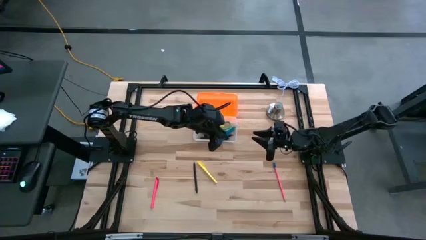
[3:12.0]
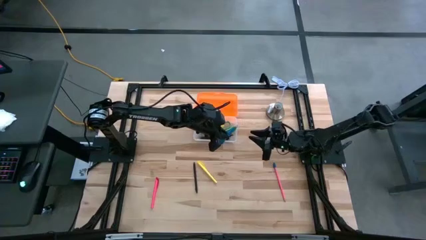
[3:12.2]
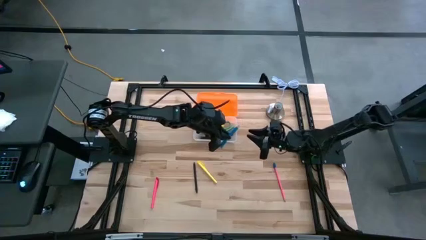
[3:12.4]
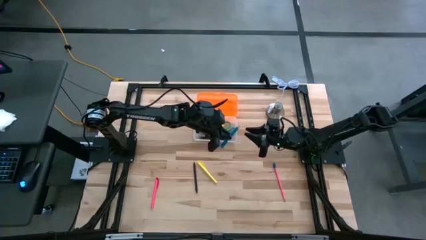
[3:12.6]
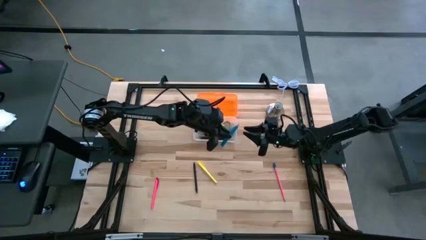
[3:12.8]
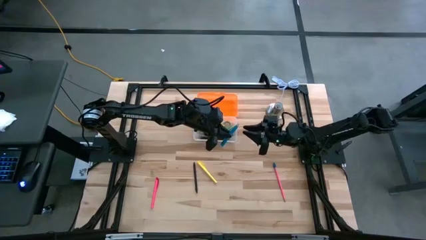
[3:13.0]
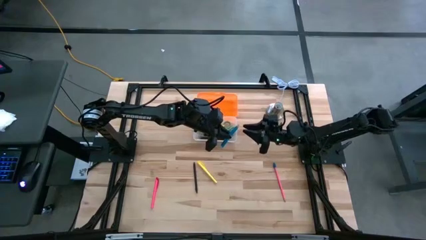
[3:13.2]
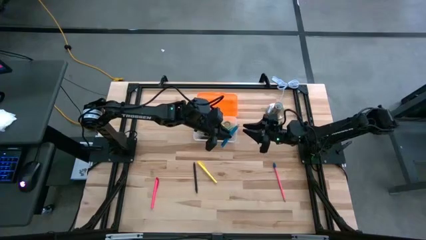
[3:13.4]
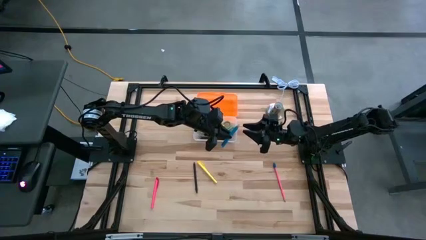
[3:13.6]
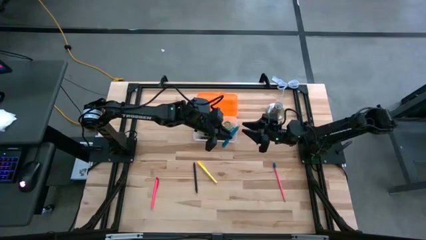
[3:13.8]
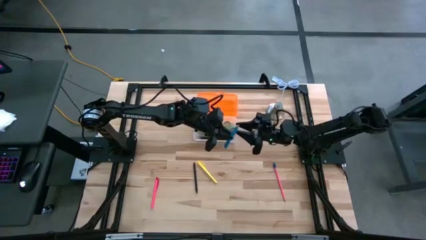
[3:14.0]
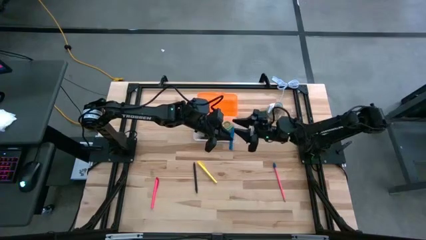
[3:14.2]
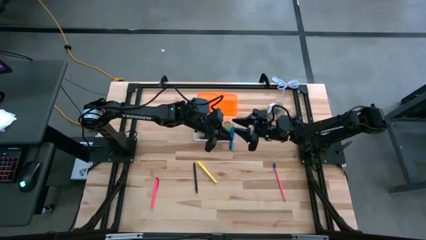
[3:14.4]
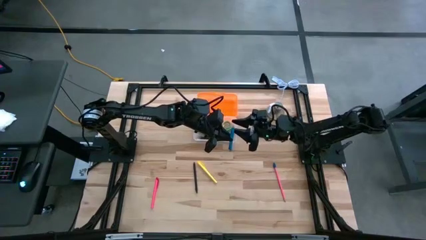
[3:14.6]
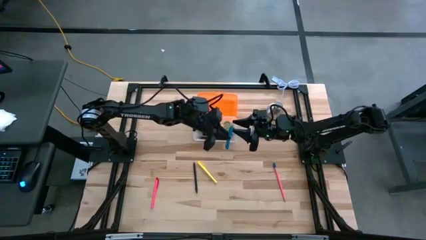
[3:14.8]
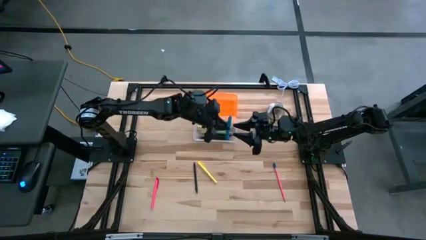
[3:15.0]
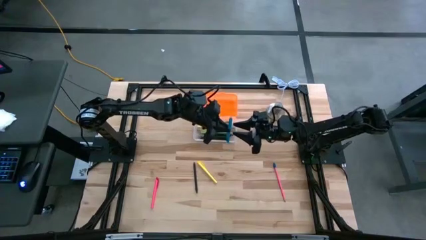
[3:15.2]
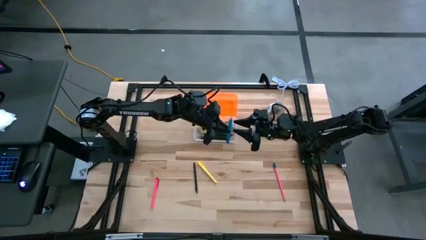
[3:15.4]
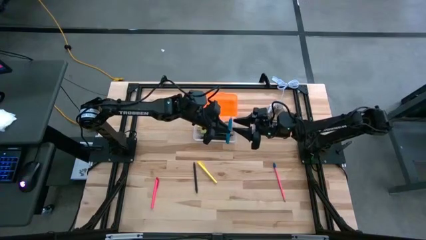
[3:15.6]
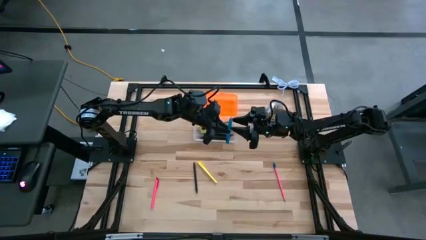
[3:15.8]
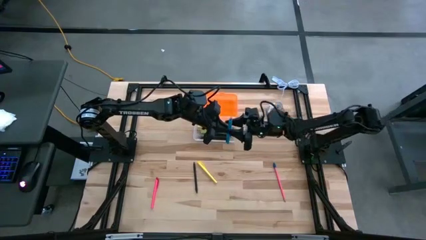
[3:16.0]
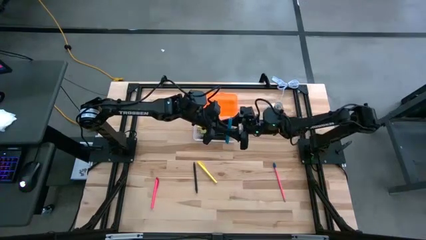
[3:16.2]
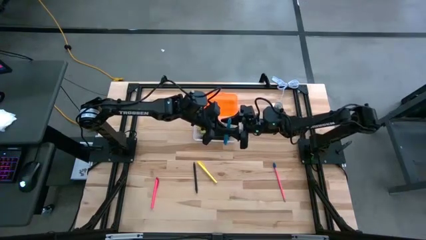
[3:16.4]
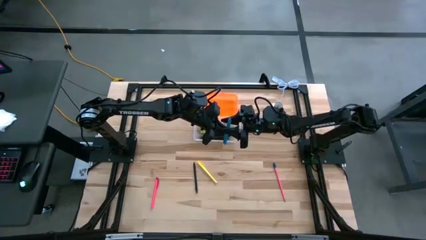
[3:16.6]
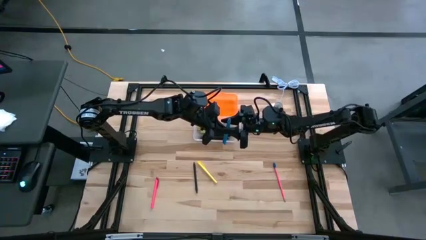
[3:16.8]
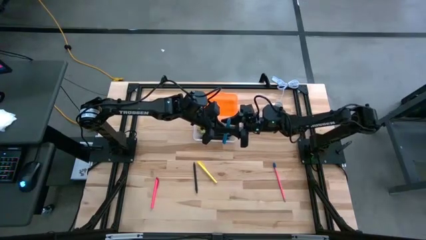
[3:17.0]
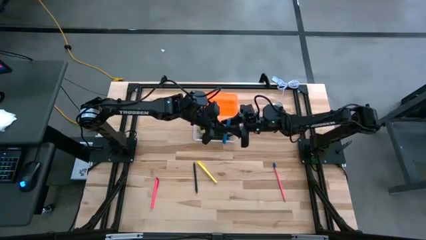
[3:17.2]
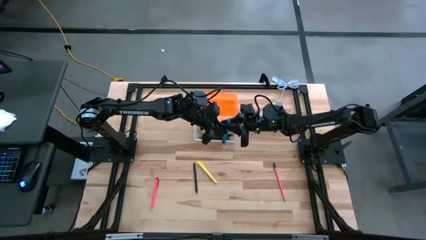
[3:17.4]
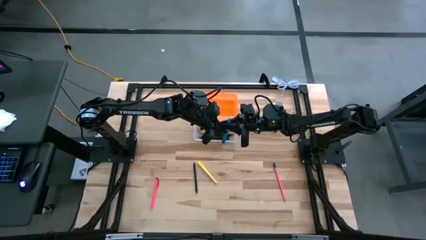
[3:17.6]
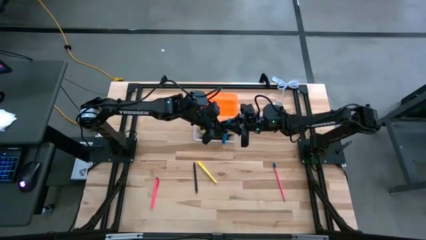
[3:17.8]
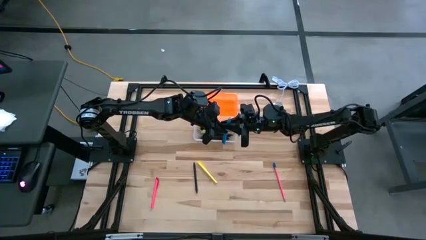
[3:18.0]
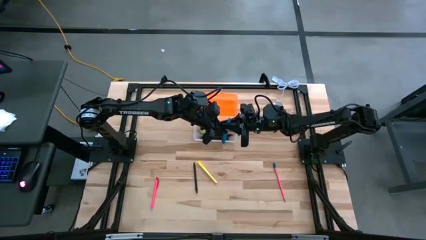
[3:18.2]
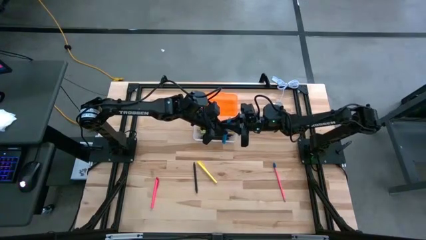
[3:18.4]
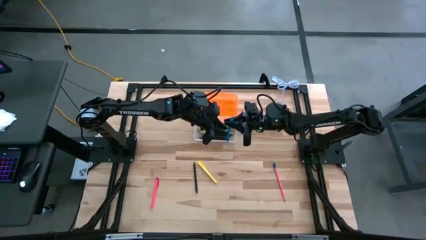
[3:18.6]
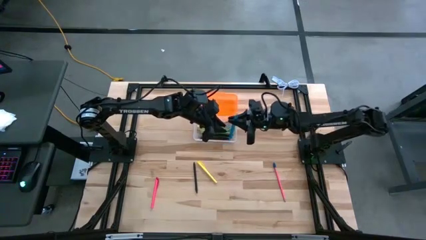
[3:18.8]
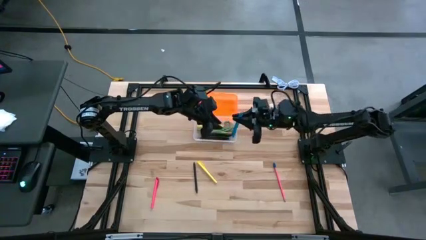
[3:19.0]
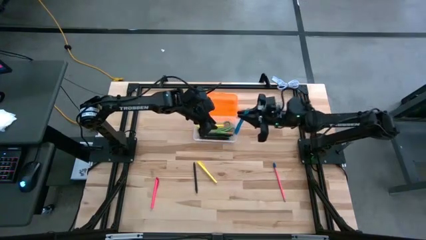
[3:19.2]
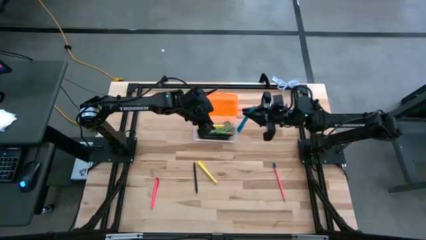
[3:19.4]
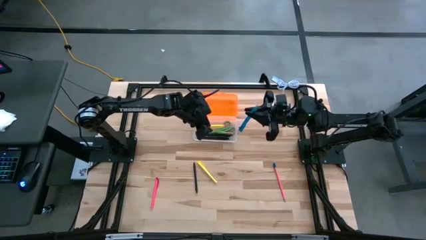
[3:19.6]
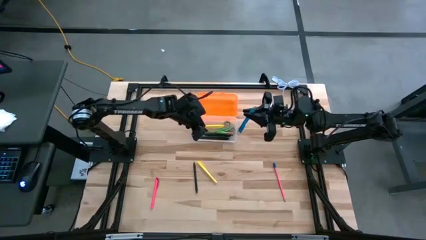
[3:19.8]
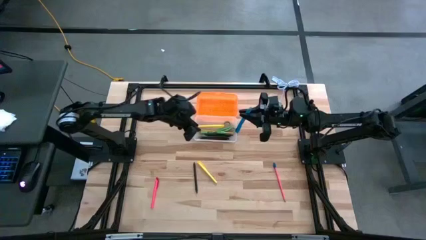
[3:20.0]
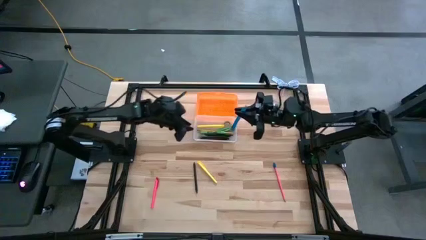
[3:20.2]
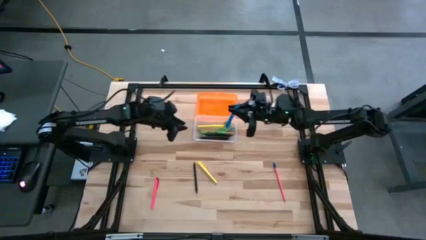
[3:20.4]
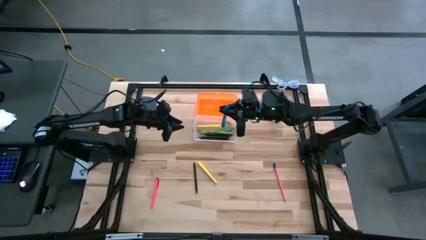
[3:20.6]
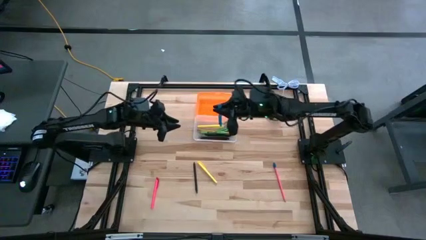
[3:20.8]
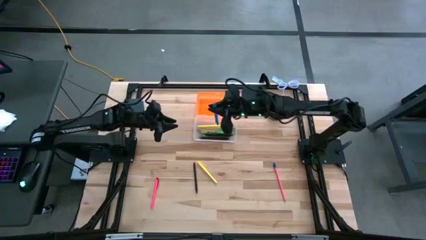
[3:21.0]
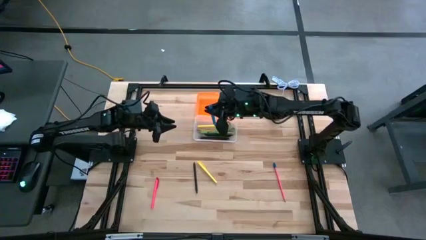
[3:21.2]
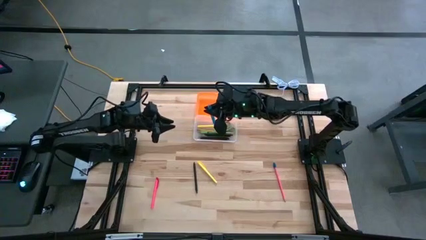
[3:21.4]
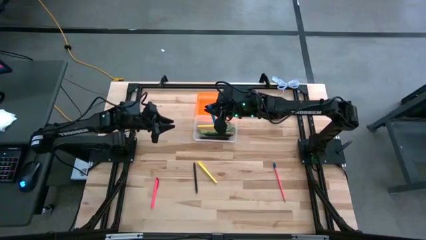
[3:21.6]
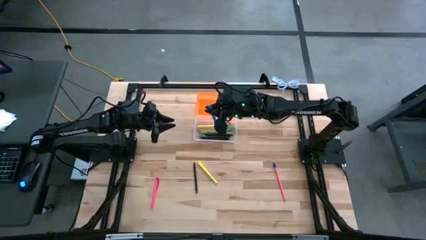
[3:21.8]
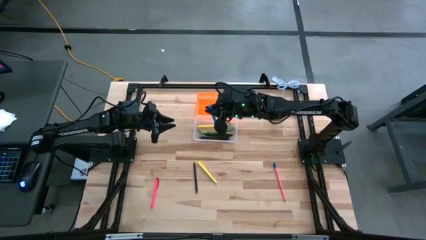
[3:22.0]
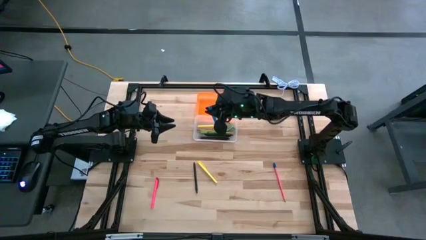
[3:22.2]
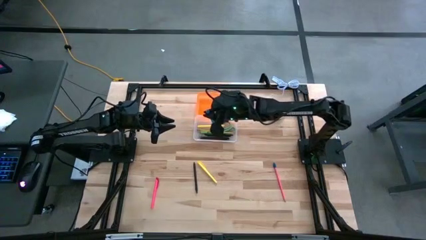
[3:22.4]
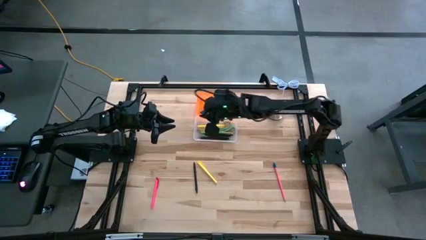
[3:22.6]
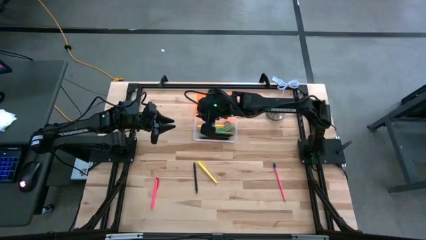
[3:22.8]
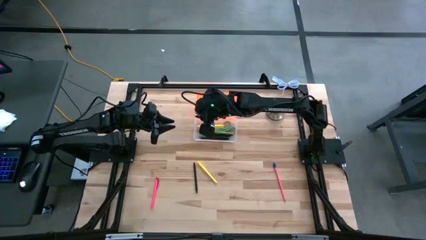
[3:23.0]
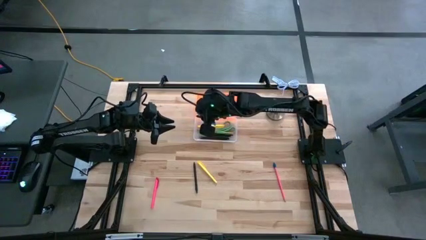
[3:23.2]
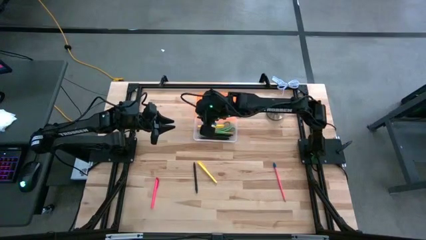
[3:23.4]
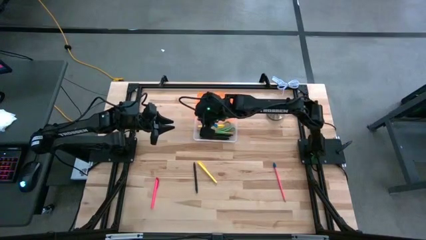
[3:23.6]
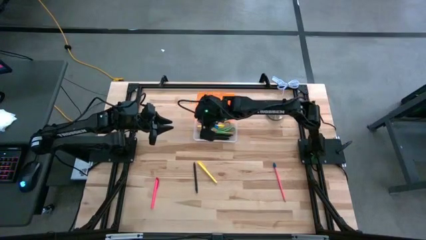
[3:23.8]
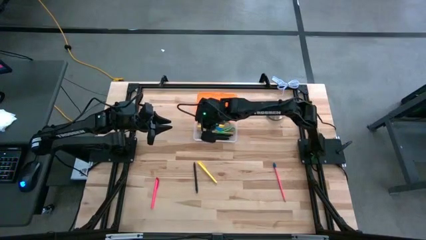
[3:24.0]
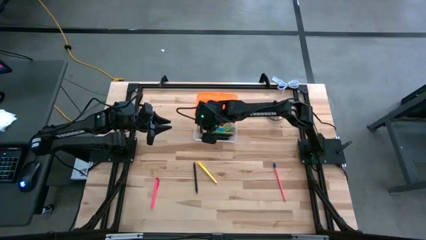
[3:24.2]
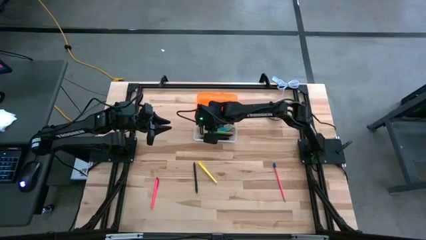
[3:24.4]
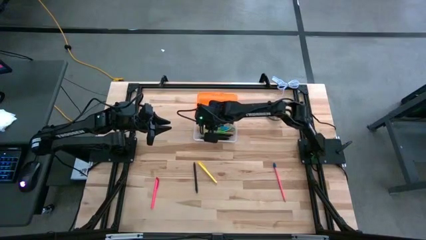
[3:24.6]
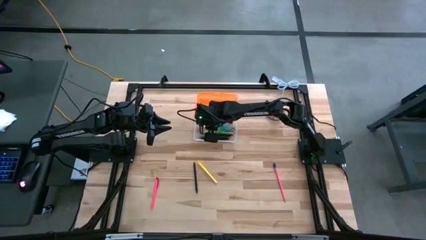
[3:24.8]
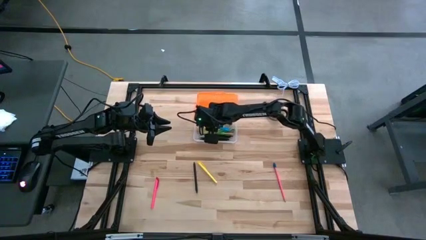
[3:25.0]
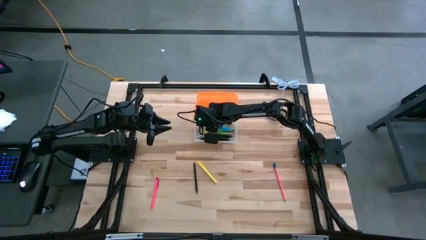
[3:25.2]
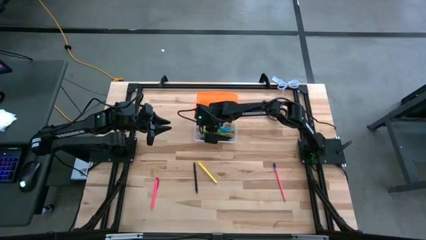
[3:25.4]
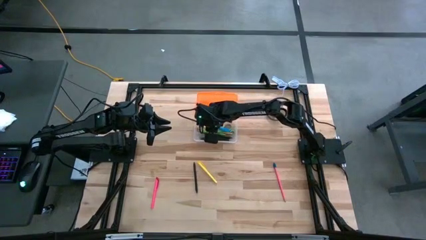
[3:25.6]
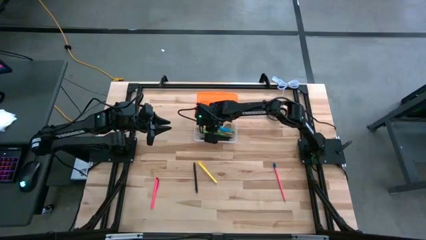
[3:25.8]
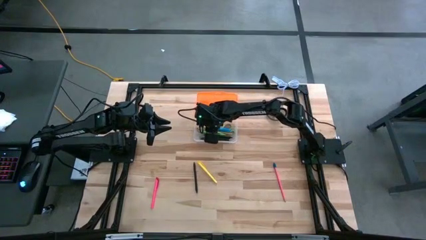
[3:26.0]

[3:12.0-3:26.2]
Task: Pick & place school supplies into a supply box
Put the blue pen into the orange supply box

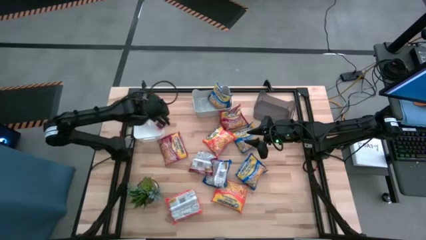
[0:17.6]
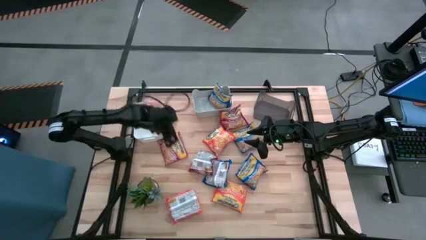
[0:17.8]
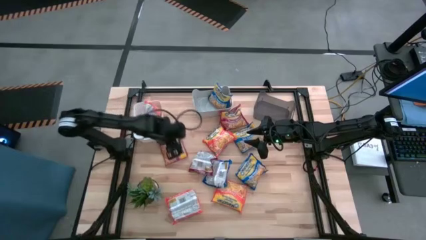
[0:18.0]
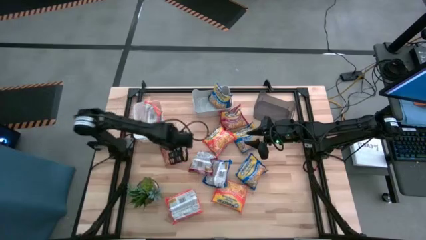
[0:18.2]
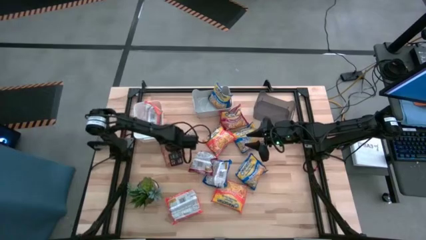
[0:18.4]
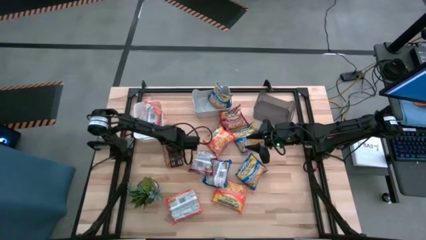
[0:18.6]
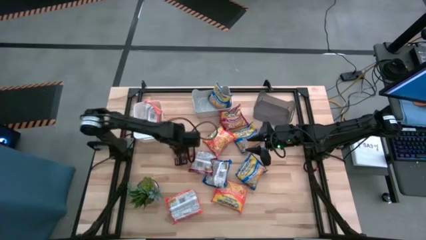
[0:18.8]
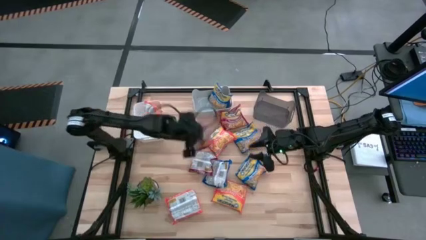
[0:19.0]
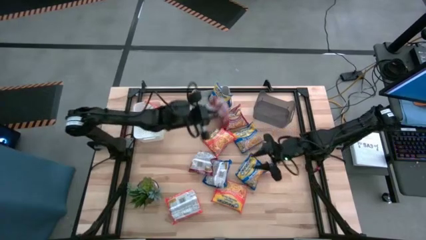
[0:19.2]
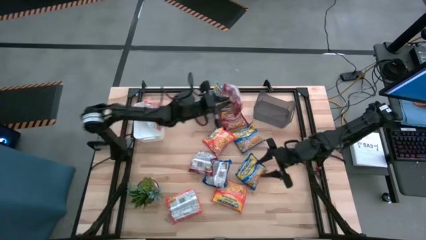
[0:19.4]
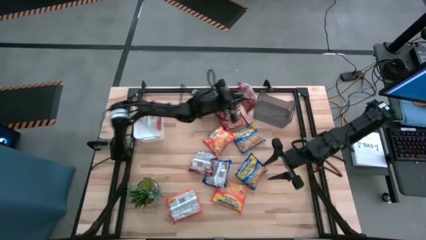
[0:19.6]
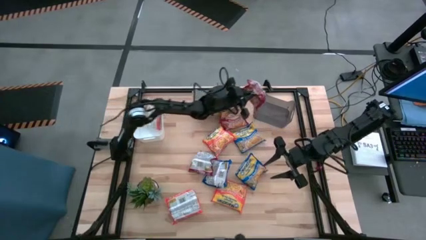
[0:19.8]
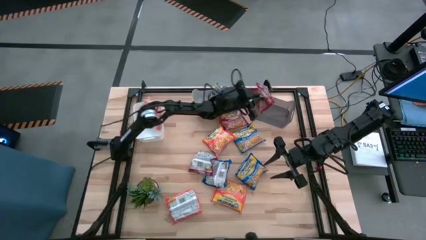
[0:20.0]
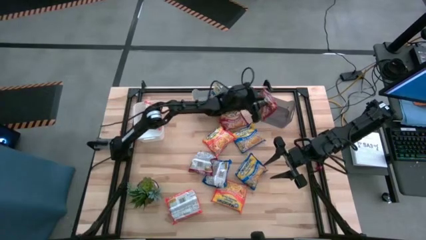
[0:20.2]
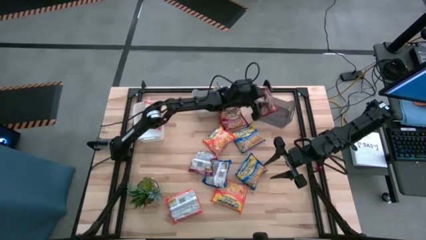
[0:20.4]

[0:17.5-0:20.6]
Task: Sort Maruchan noodles
Put the top left red noodle pack into the black bin
